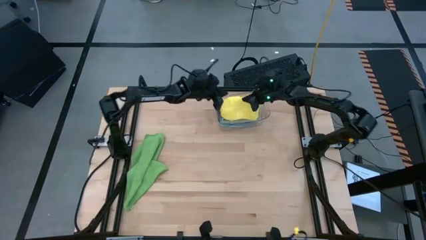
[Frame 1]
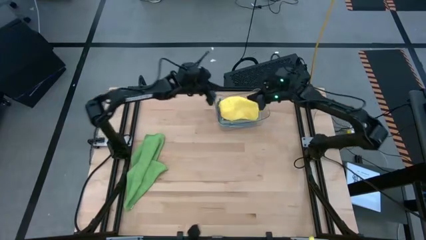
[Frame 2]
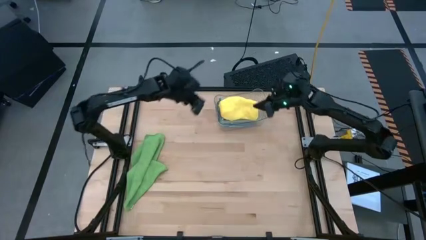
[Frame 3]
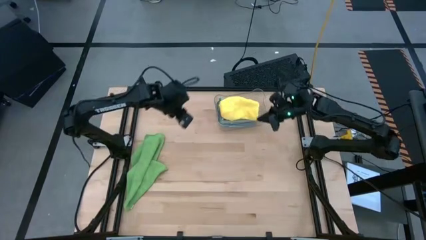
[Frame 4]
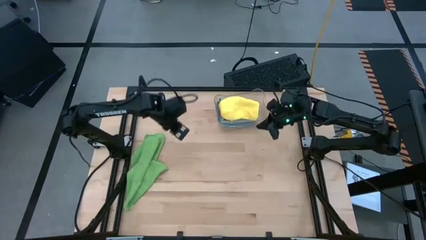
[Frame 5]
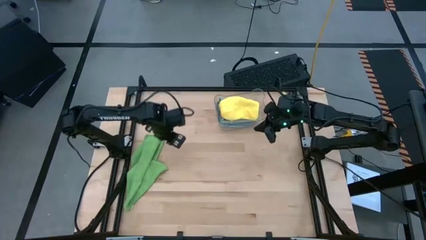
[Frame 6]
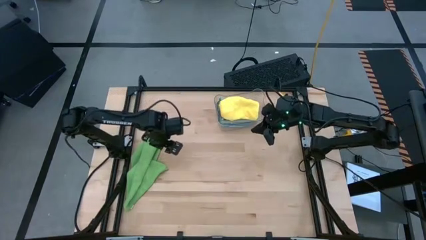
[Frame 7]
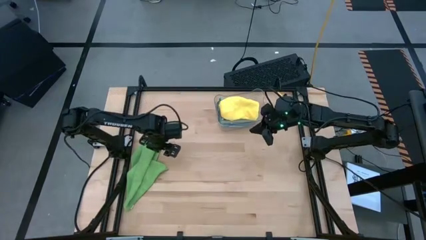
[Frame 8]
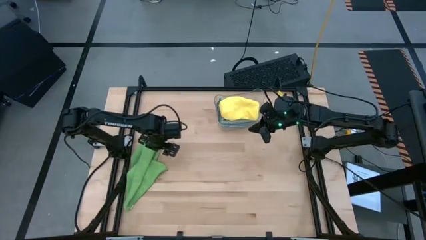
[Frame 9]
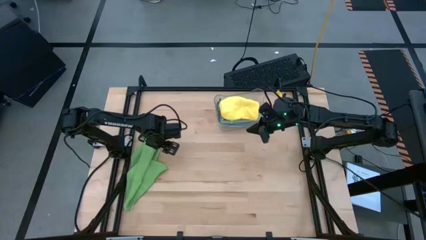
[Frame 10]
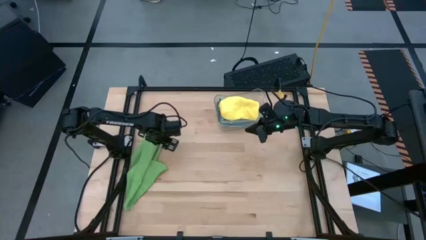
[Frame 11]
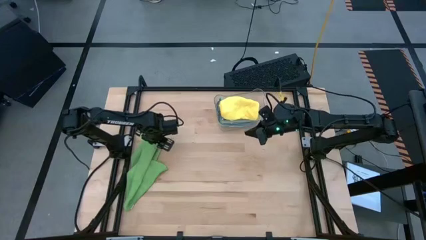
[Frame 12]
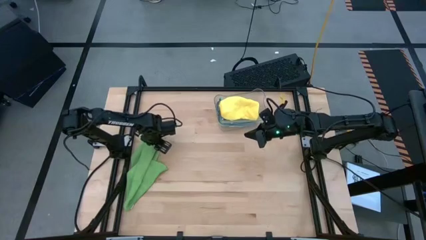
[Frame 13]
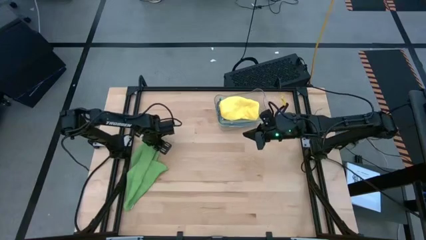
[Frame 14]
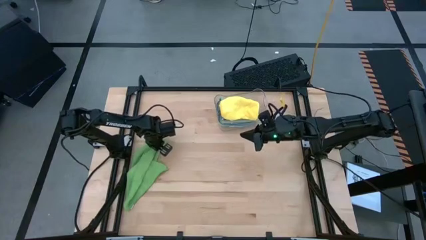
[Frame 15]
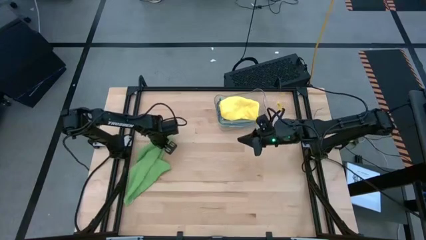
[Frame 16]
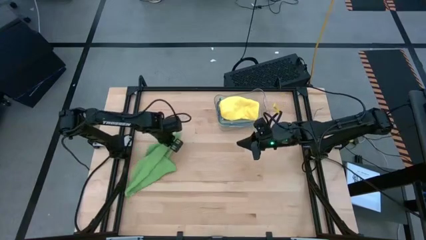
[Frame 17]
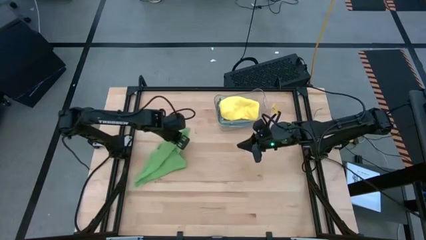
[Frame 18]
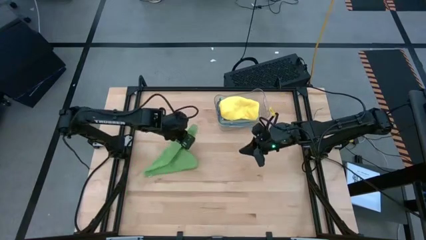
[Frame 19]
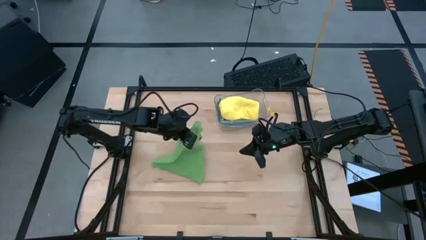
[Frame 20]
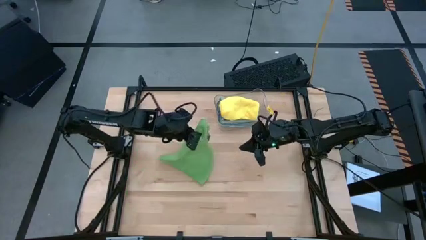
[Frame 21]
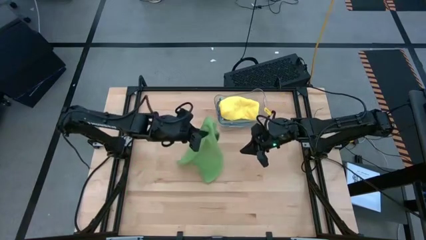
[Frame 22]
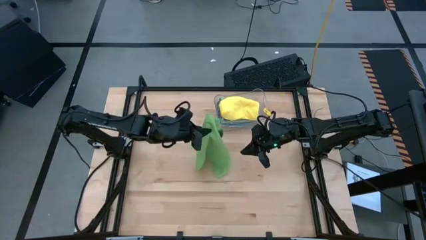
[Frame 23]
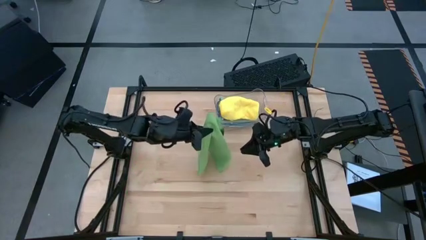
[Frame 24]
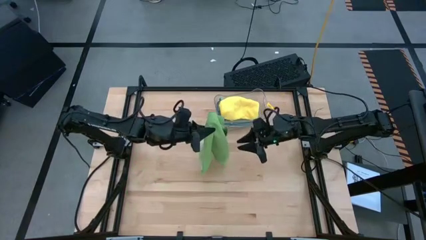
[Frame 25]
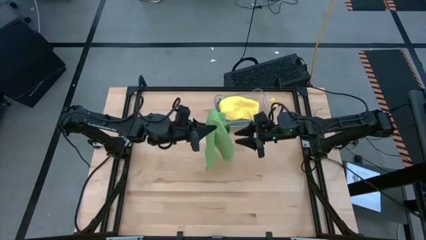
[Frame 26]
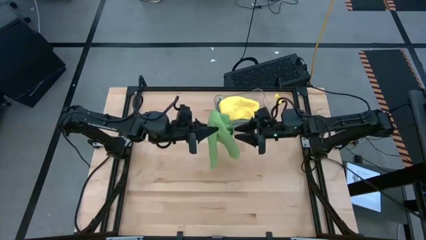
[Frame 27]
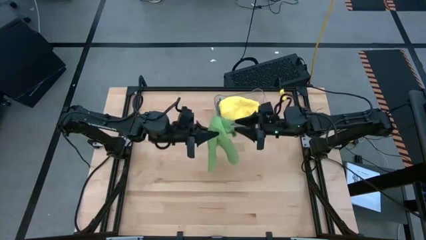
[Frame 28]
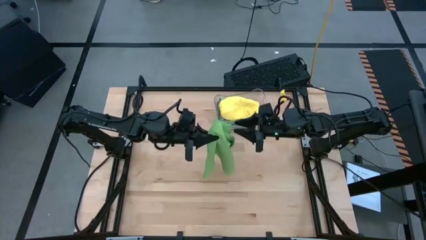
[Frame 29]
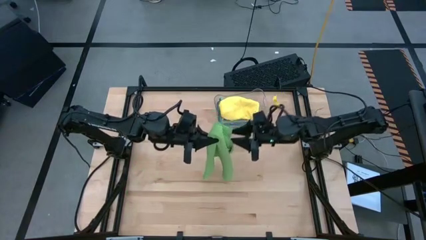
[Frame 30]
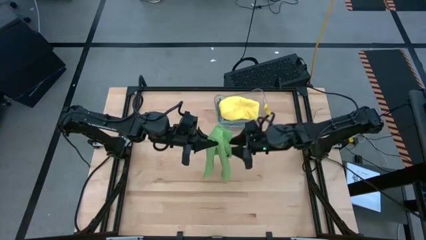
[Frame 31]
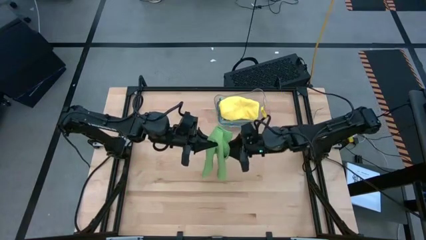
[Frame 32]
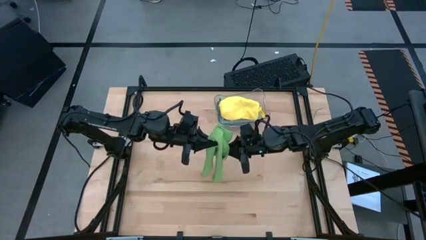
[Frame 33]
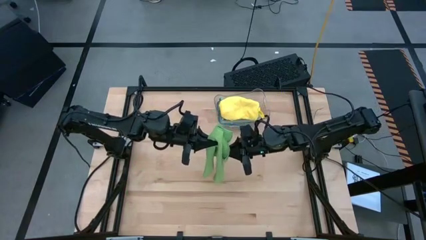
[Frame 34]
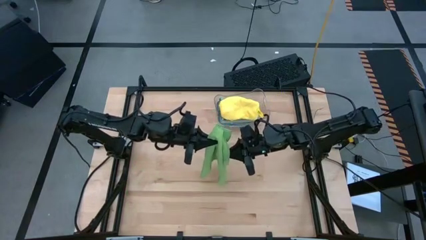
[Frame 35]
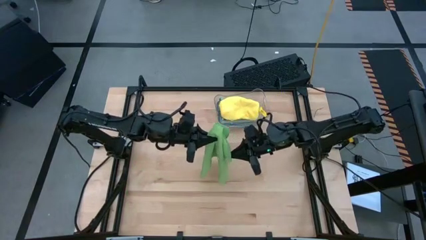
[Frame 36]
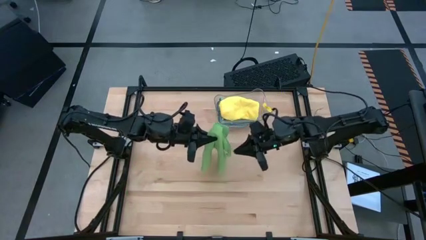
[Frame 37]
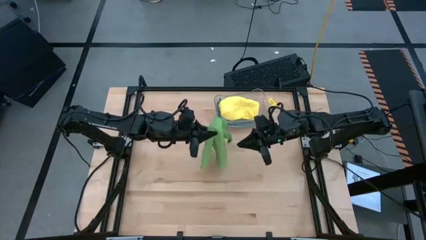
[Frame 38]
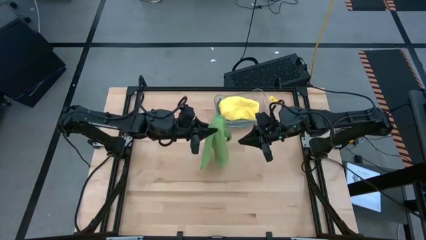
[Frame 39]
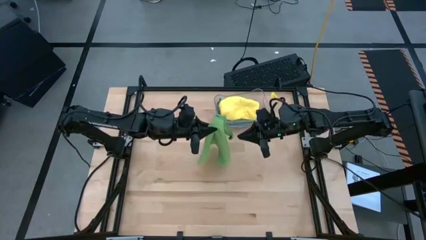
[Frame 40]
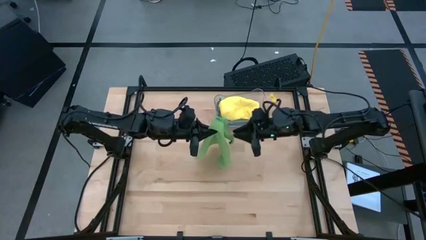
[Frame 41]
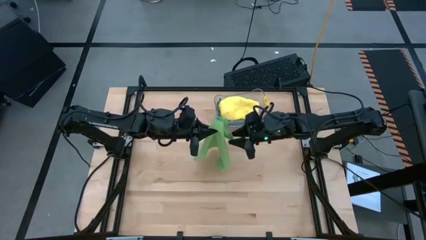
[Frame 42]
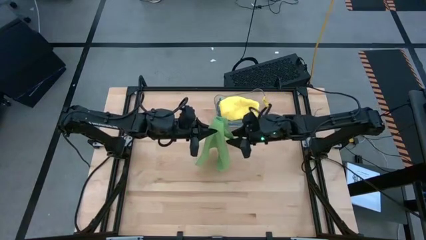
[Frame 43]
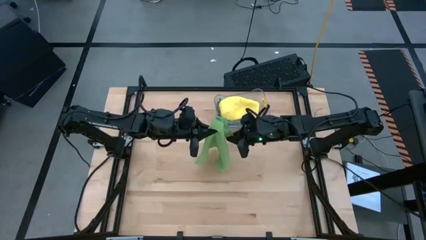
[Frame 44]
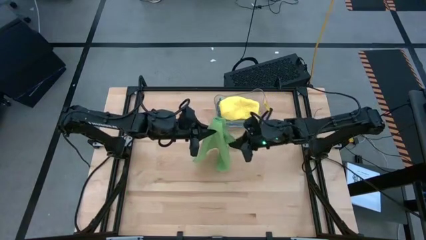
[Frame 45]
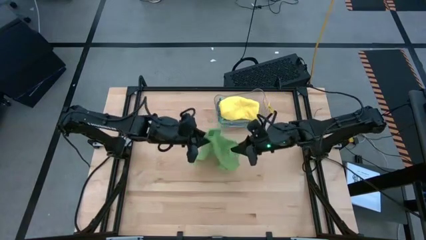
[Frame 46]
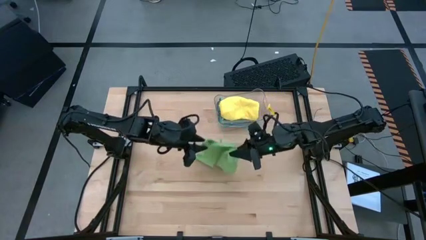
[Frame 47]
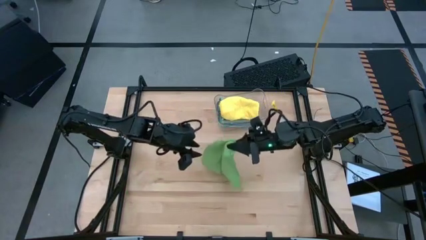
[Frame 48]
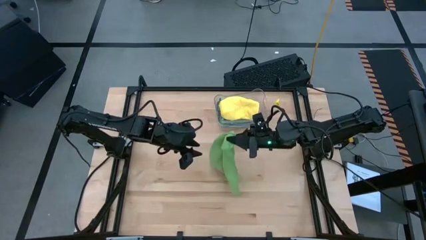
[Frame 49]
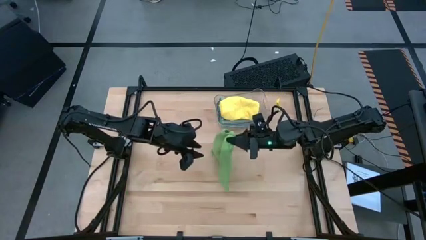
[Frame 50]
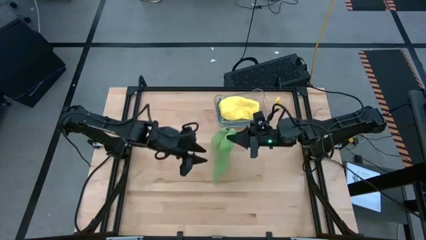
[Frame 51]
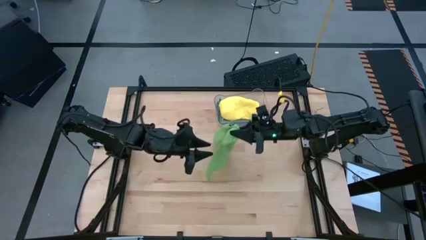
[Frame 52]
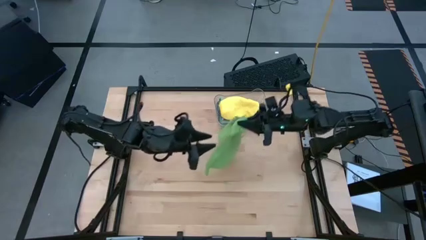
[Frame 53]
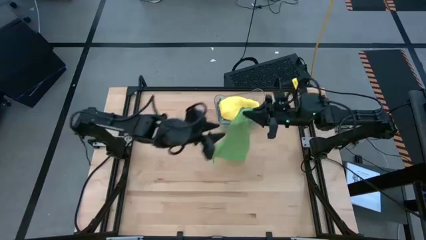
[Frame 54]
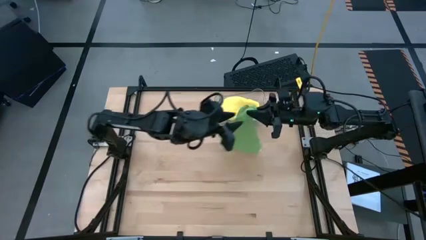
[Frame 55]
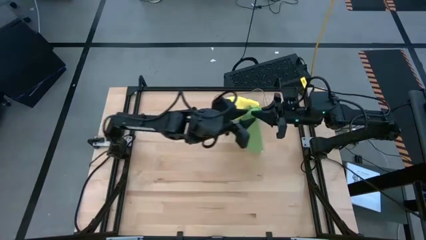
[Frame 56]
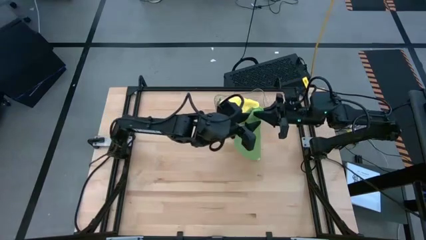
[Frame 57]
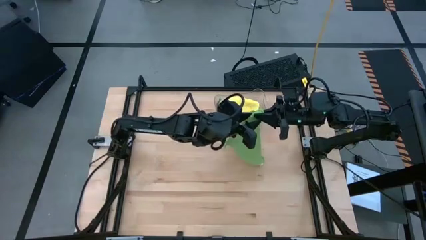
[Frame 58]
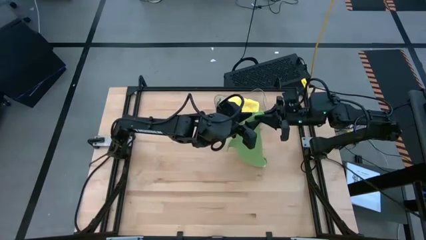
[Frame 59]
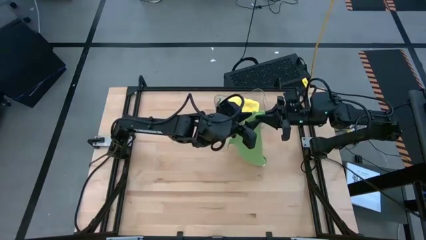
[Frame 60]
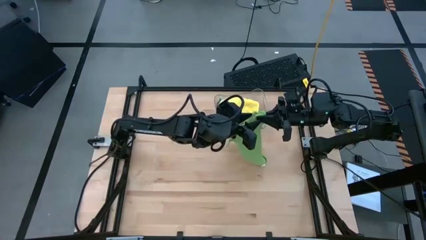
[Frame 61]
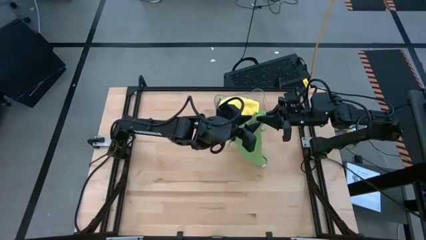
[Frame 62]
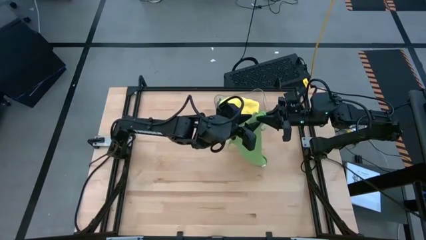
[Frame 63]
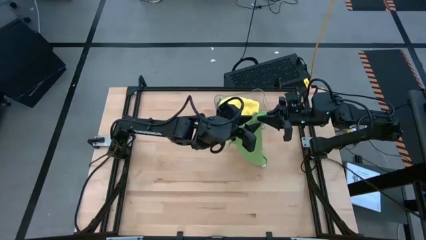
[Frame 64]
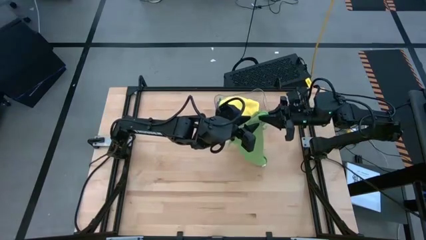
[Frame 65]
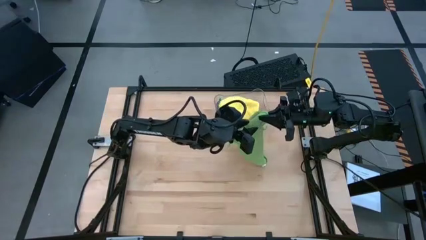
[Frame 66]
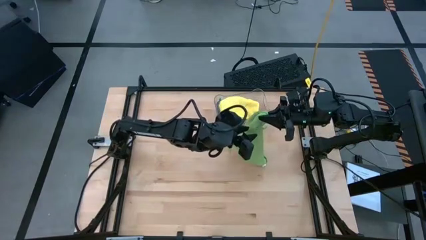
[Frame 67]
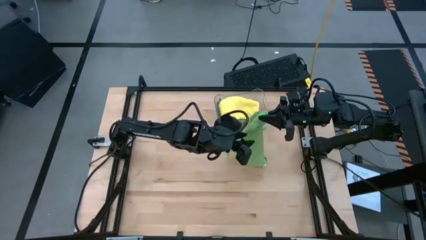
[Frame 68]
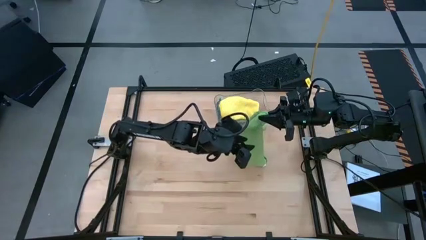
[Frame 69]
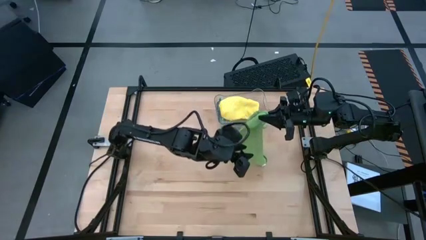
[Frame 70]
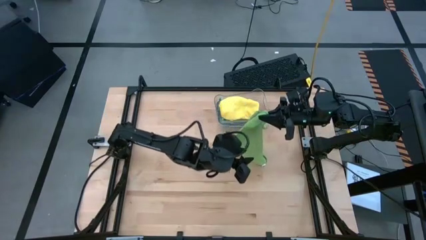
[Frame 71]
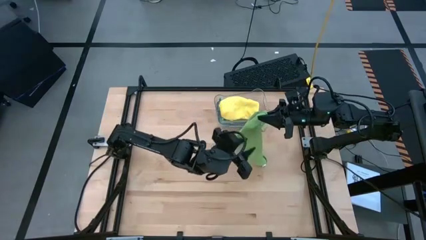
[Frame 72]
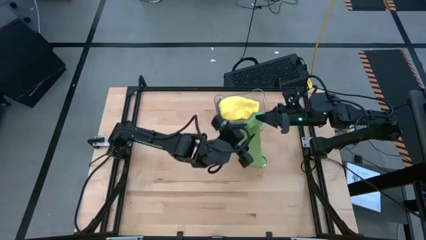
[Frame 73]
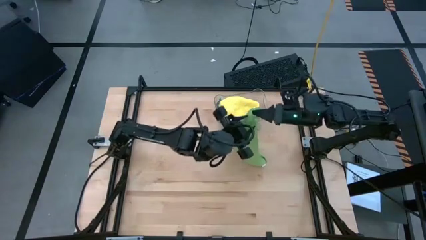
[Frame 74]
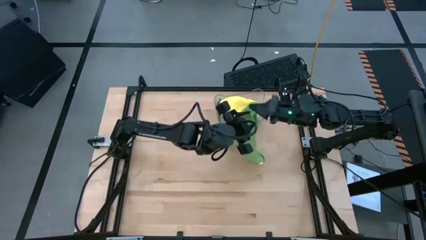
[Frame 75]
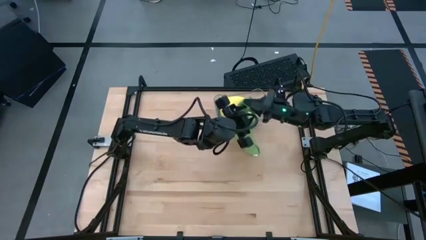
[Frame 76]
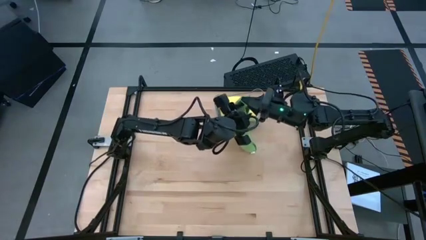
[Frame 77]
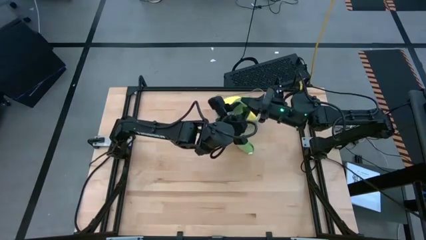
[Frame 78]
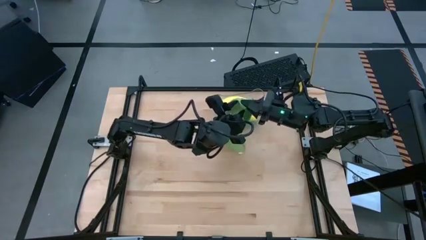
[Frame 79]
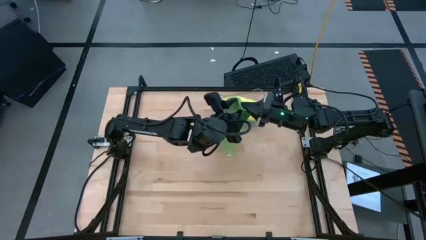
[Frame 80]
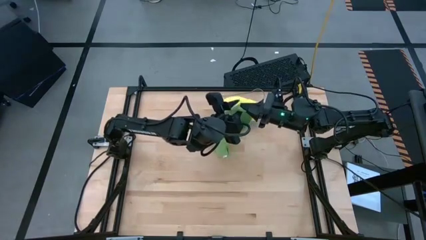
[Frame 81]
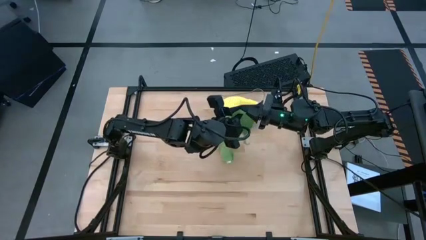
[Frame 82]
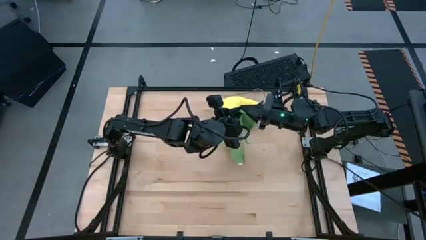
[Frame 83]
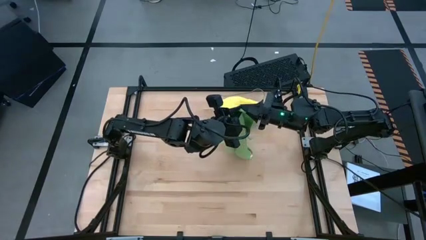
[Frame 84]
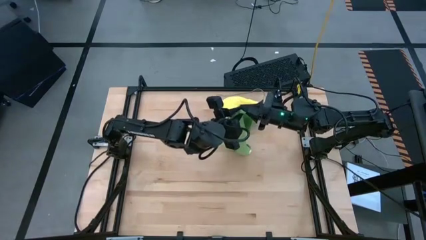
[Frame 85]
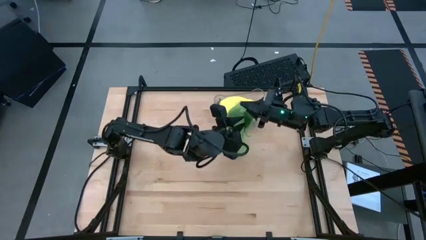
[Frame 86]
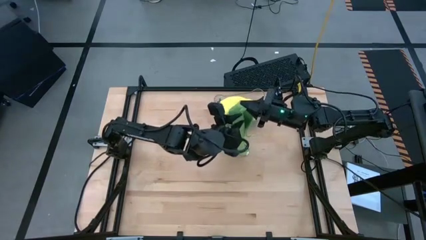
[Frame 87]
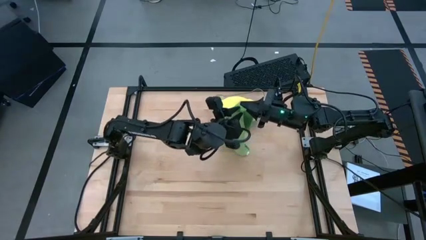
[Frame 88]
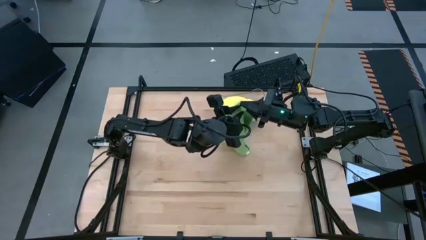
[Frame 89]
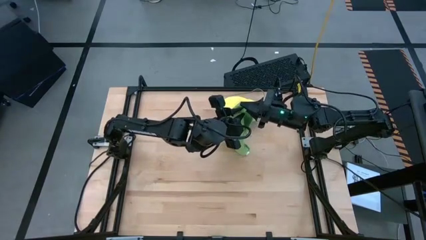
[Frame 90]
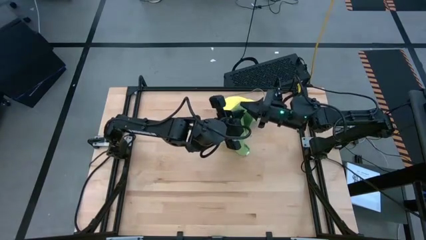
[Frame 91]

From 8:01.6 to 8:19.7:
Task: Fold microfiber towels
Fold the green towel
